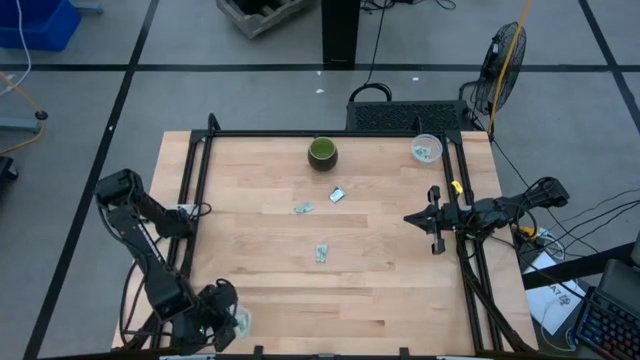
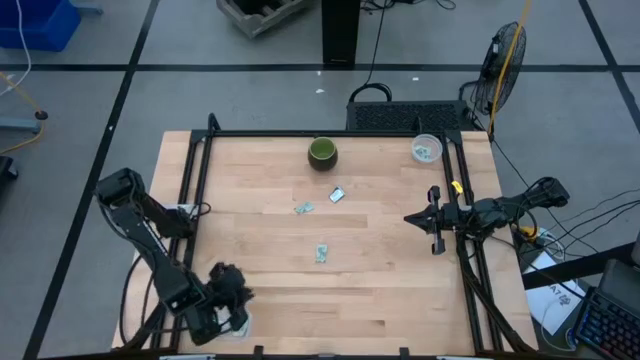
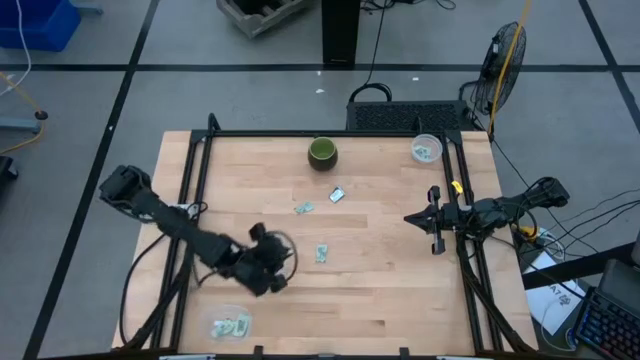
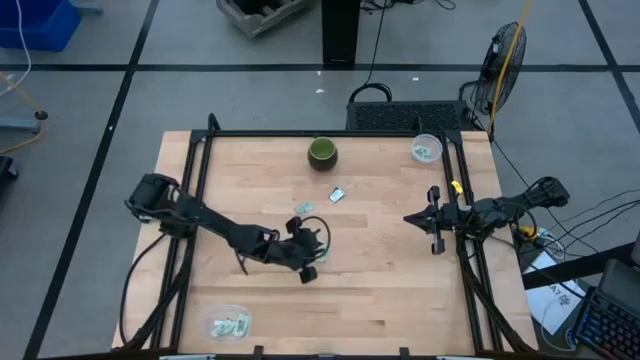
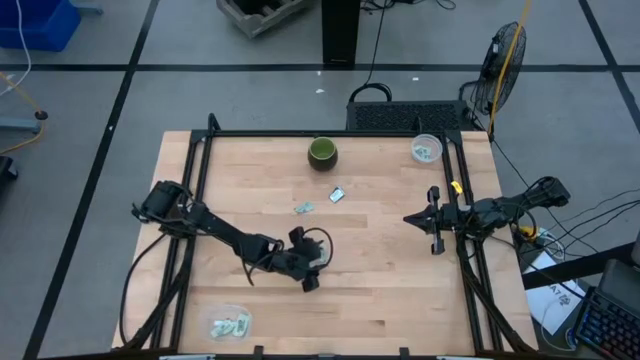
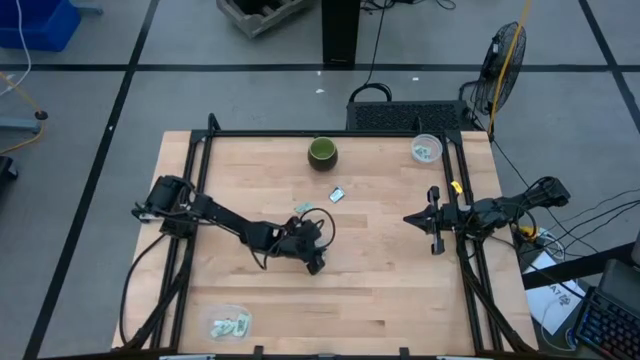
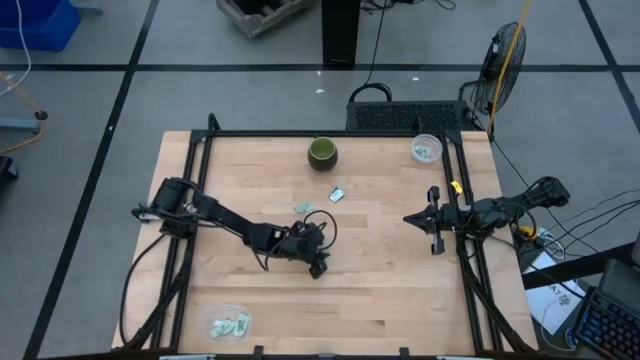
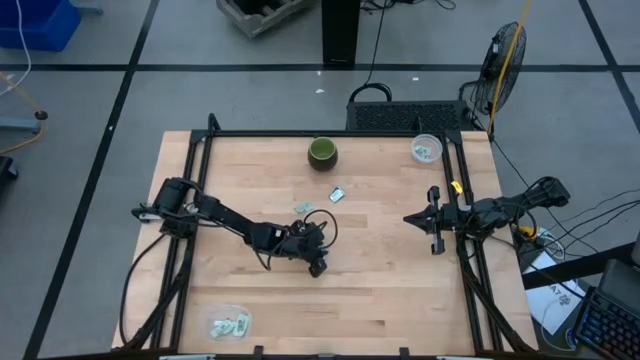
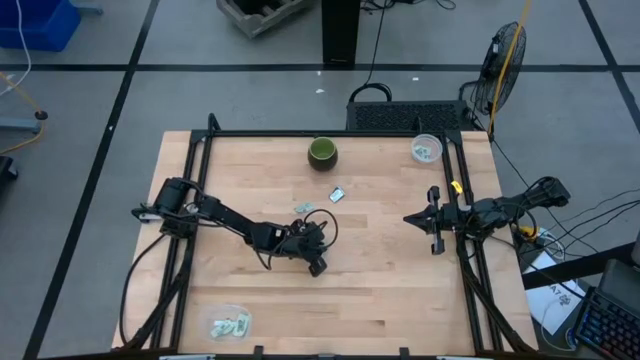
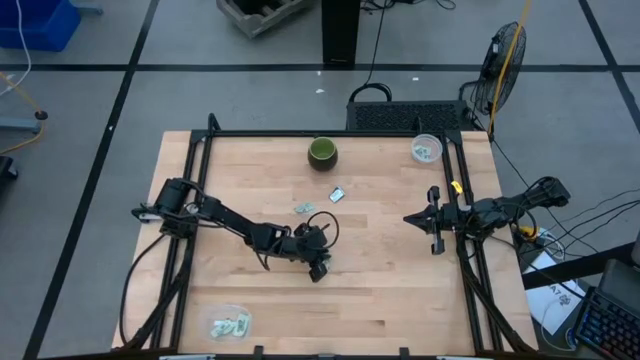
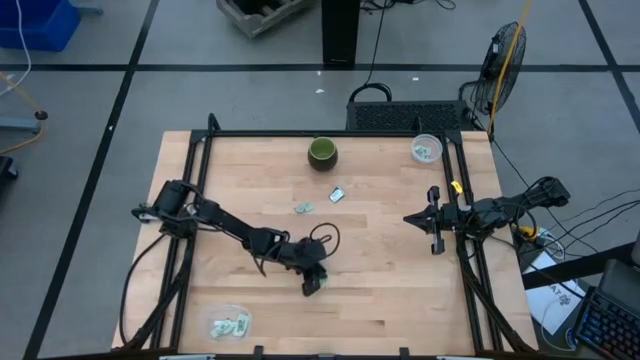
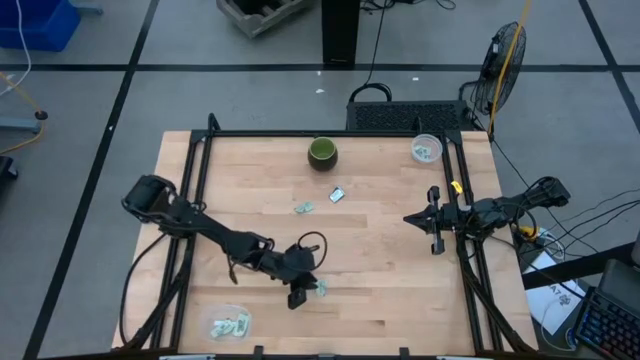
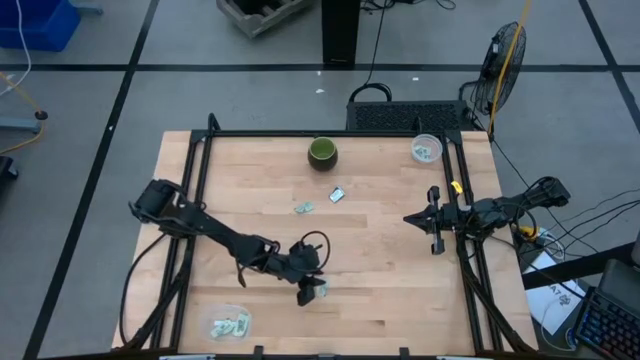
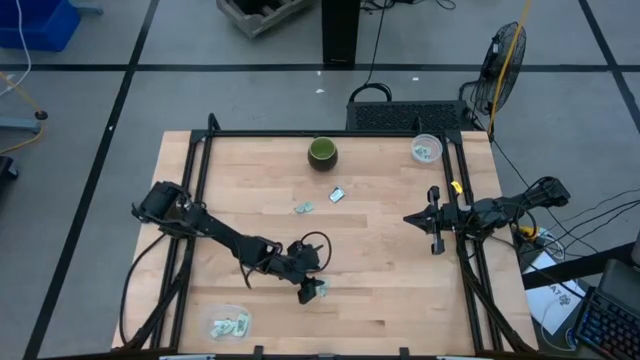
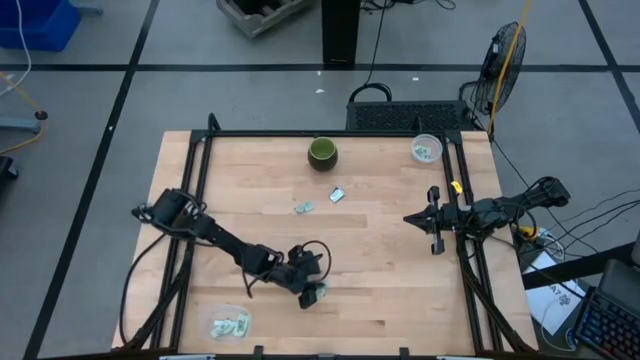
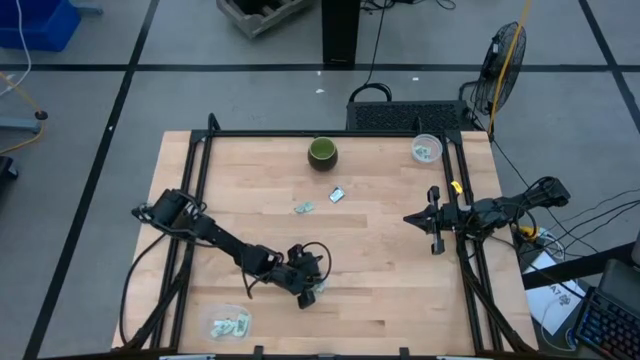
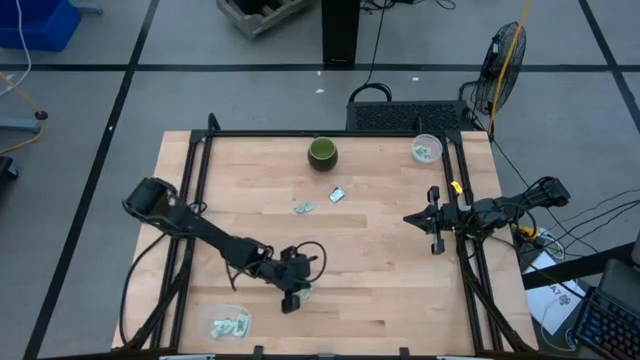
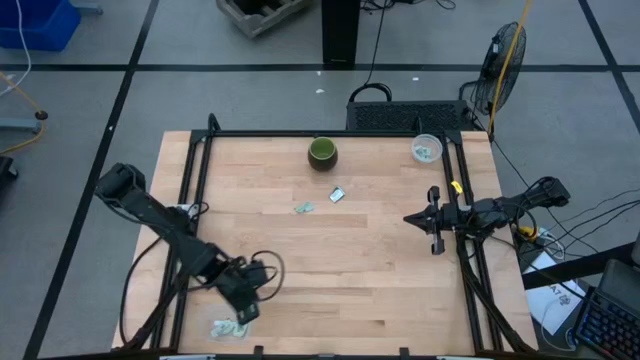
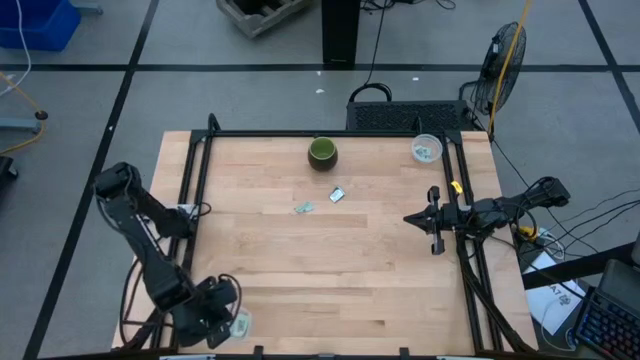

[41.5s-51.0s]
Task: Pick and place items into bin
Put the stevia packet into the bottom transparent bin

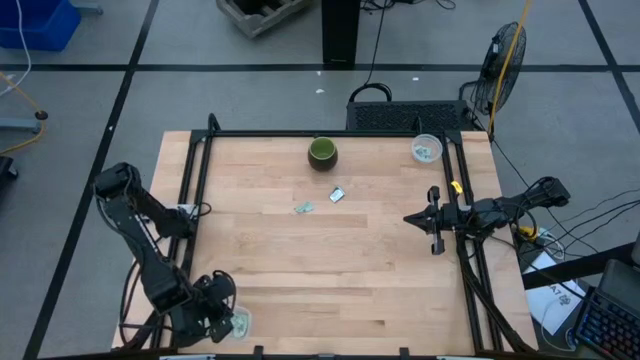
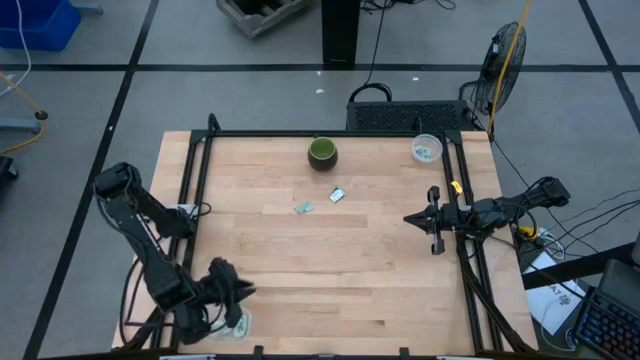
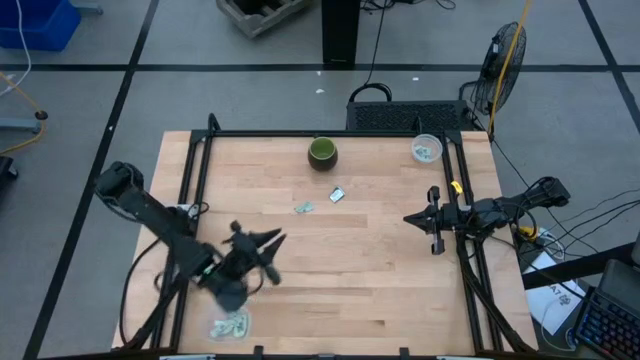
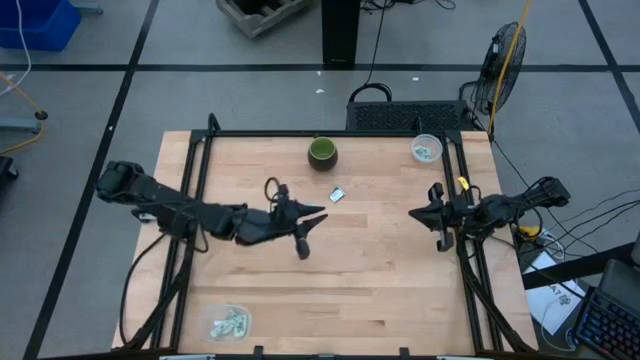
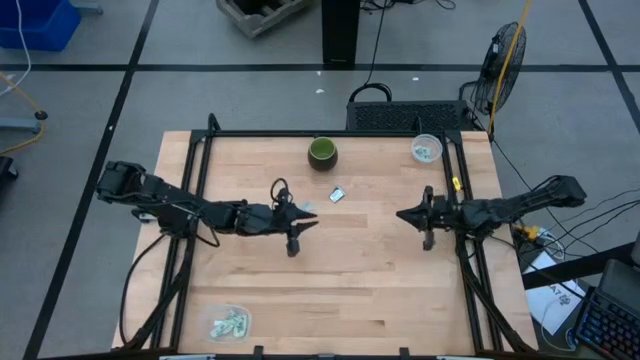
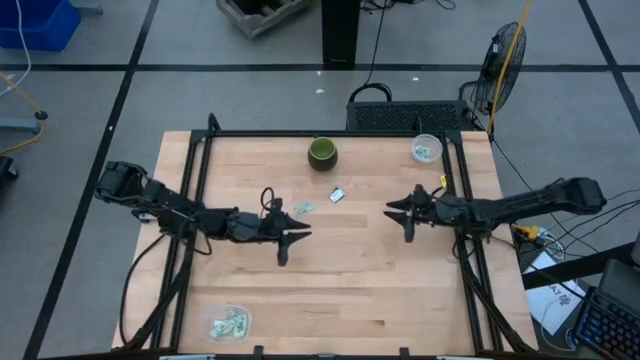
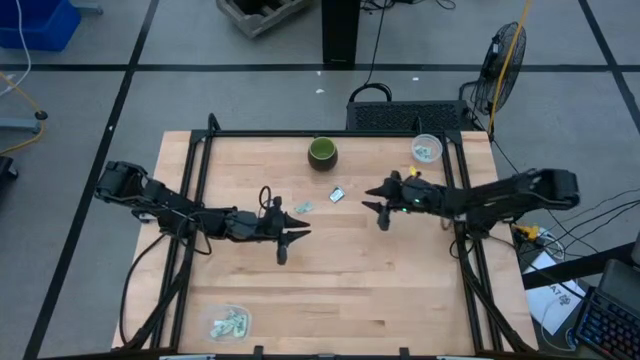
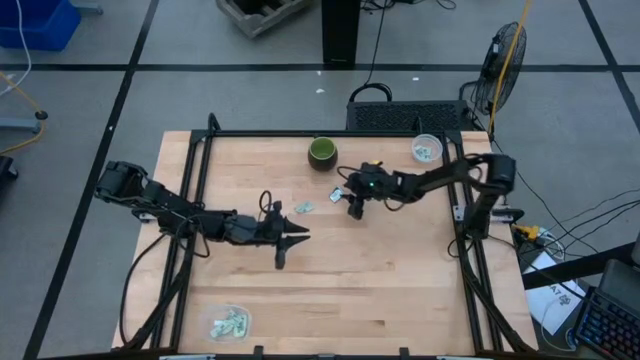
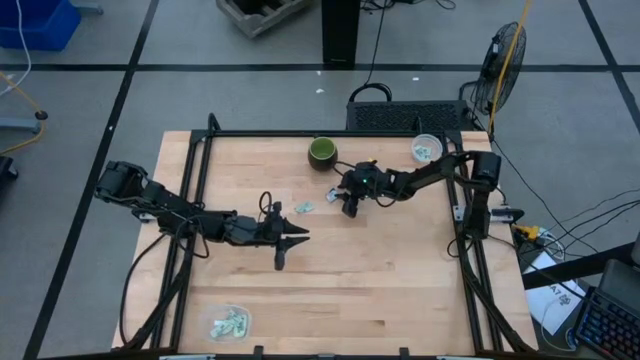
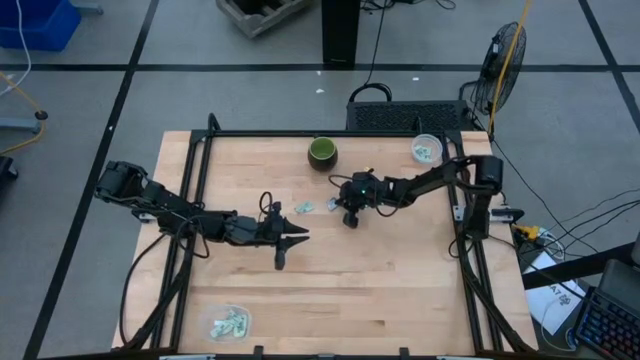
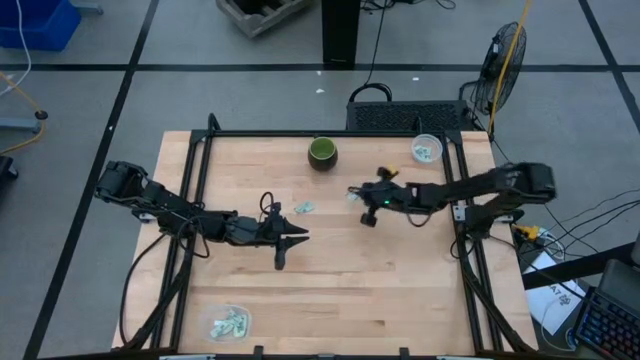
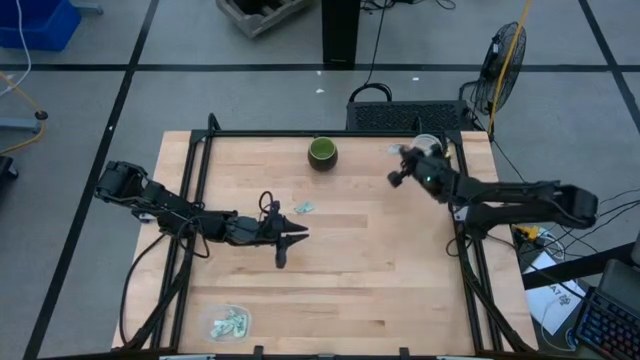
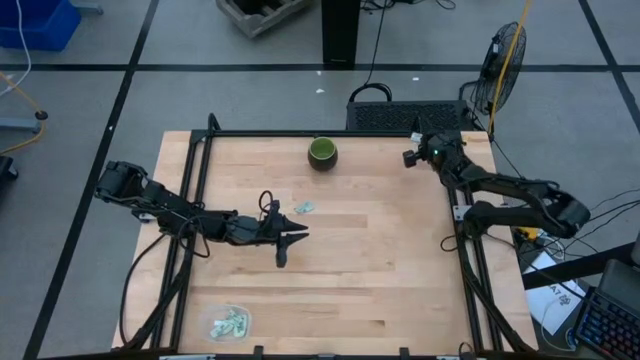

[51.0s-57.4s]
Put the truvia packet into the top transparent bin

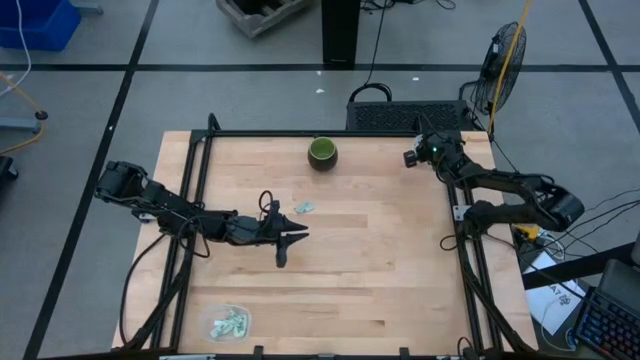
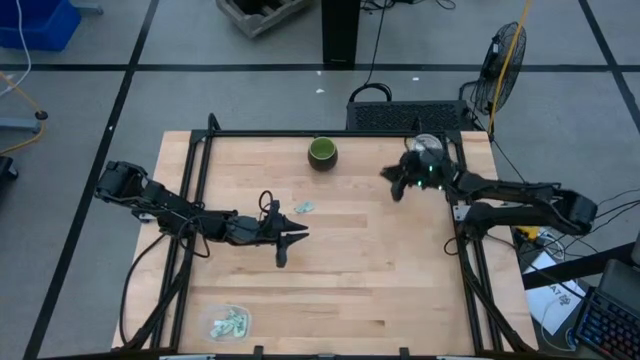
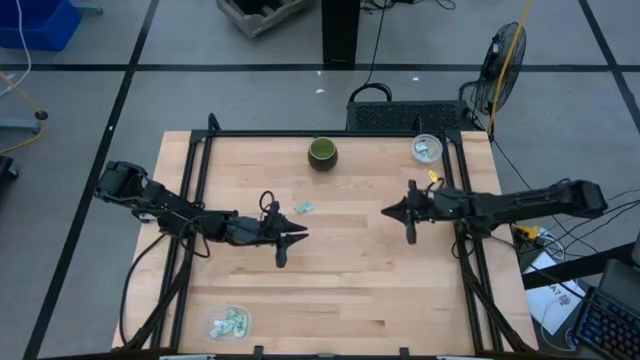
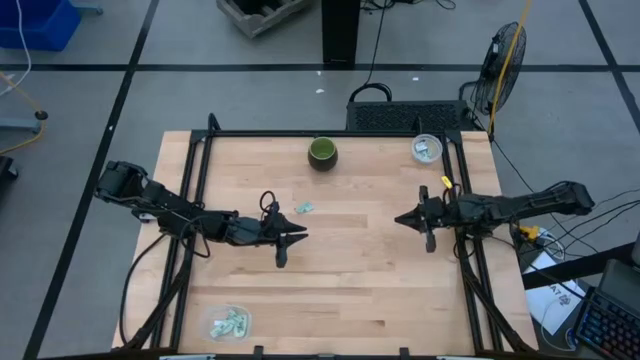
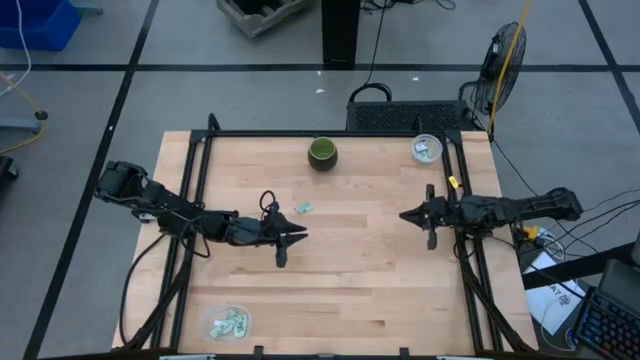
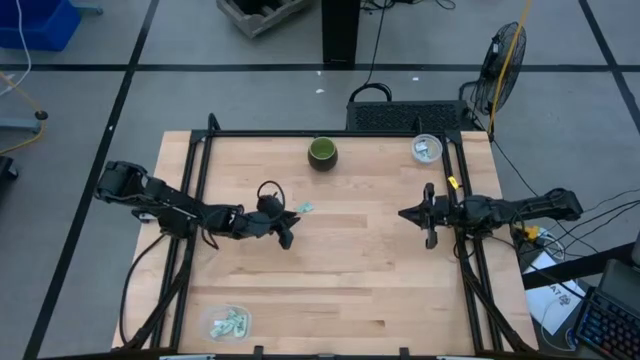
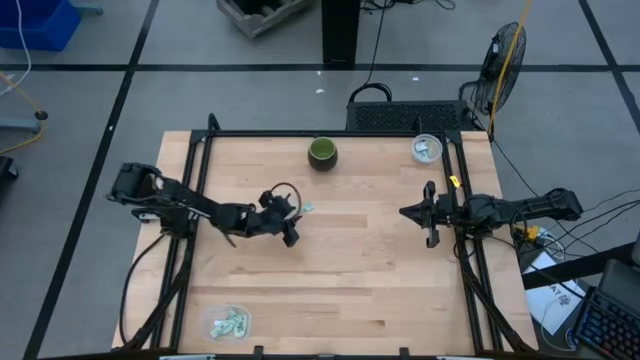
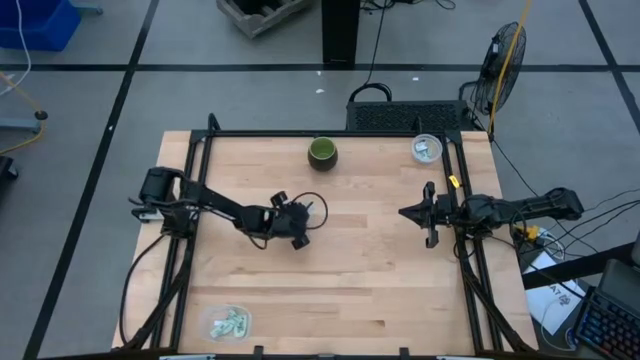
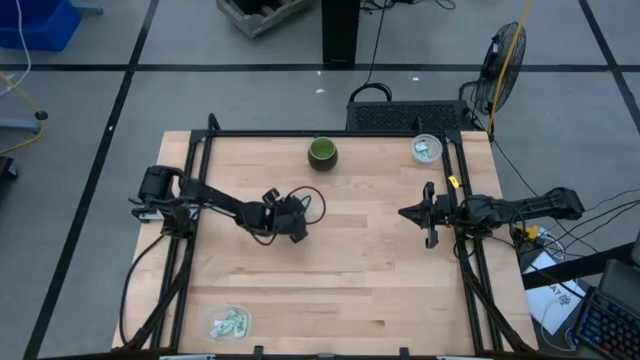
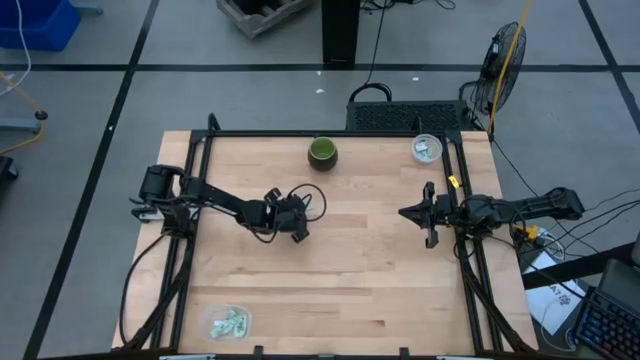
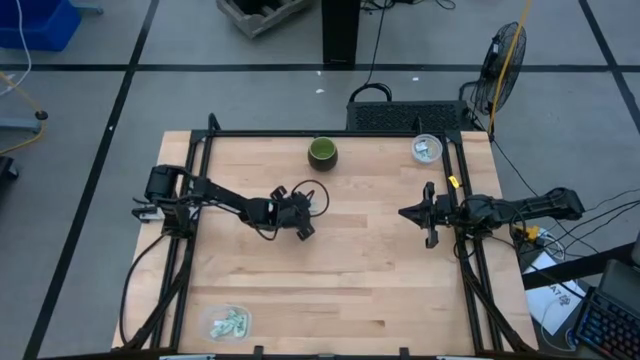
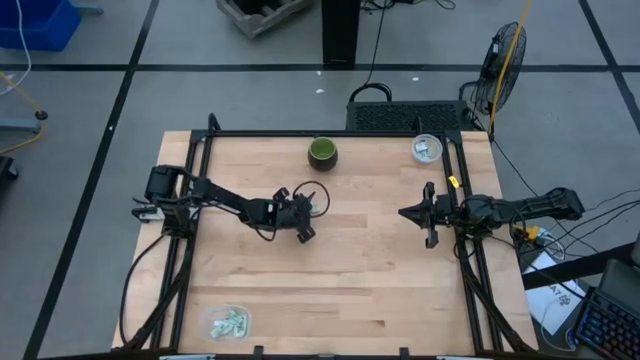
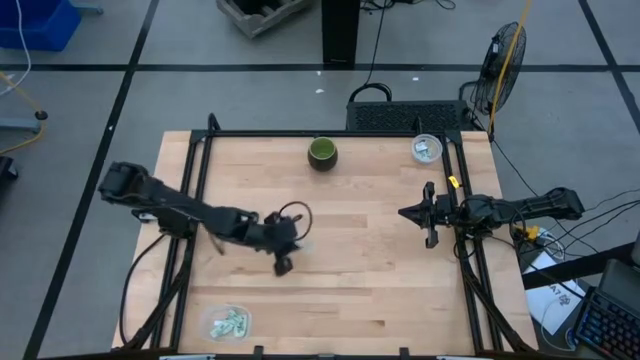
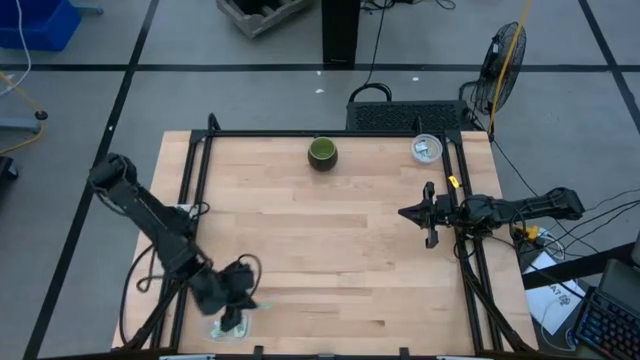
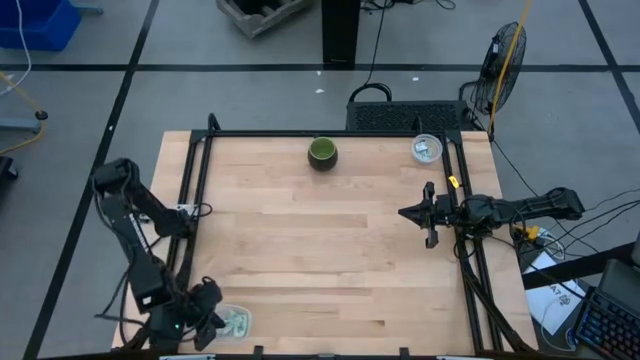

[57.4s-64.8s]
Put the stevia packet into the bottom transparent bin
